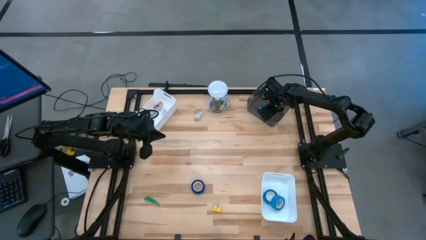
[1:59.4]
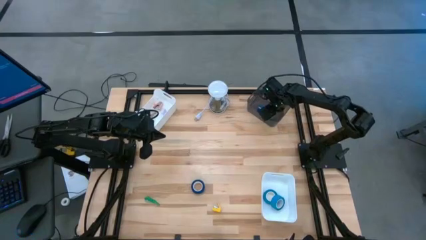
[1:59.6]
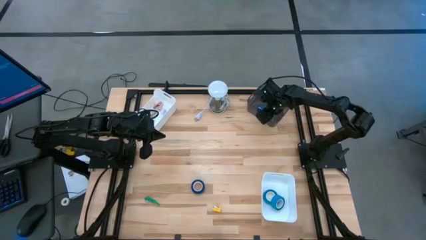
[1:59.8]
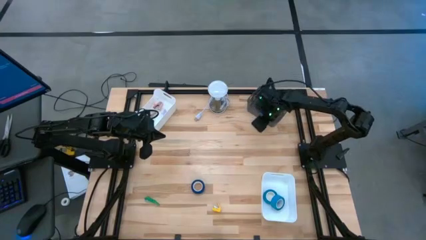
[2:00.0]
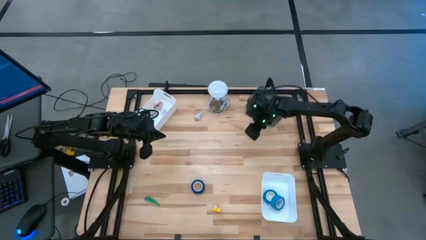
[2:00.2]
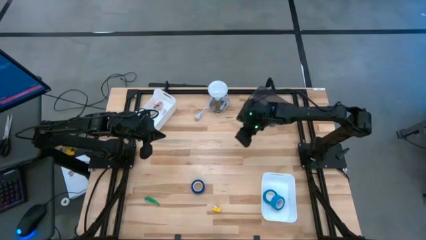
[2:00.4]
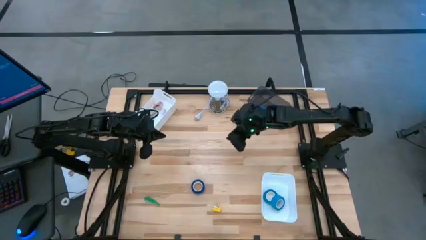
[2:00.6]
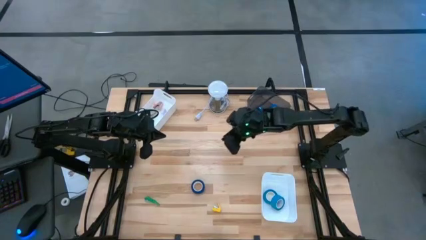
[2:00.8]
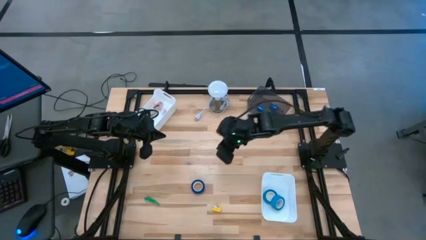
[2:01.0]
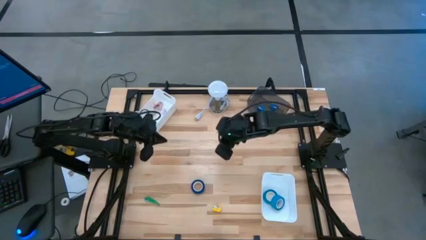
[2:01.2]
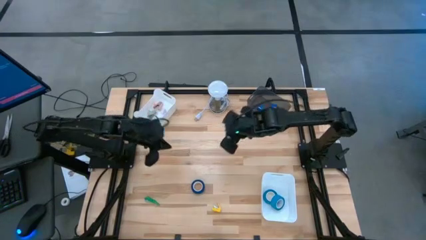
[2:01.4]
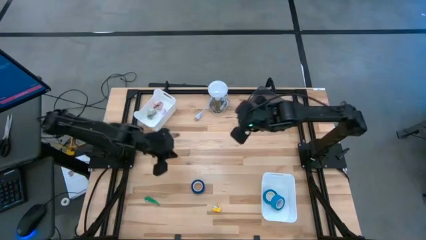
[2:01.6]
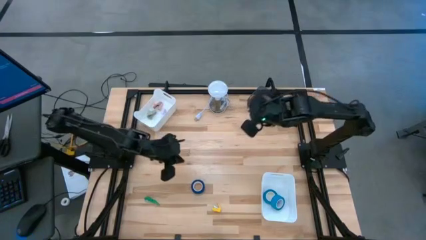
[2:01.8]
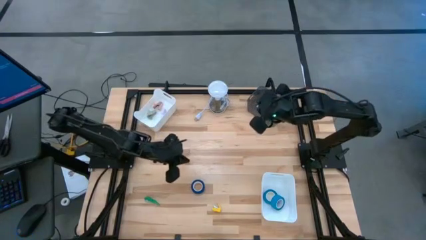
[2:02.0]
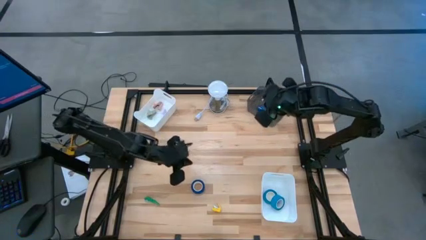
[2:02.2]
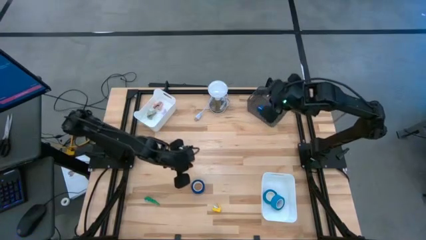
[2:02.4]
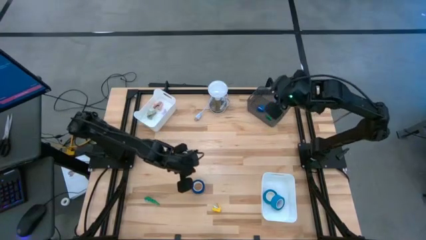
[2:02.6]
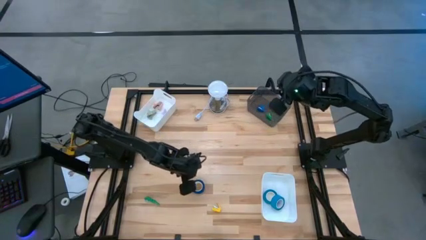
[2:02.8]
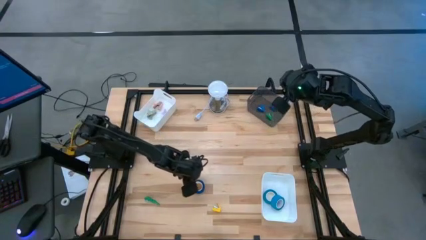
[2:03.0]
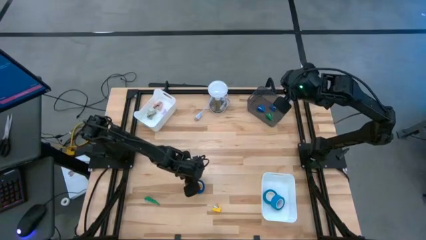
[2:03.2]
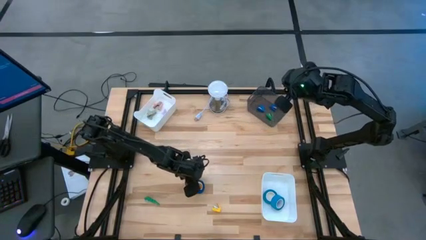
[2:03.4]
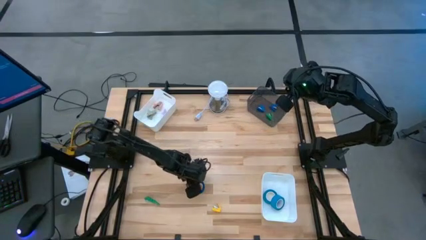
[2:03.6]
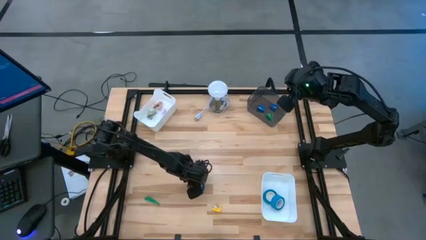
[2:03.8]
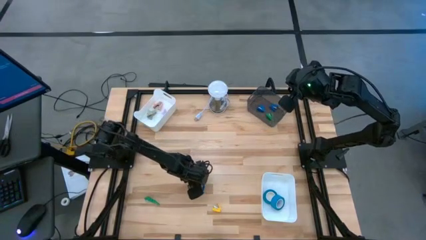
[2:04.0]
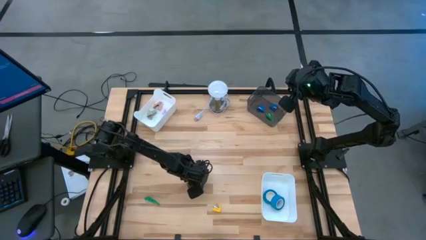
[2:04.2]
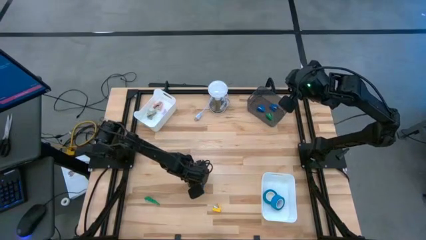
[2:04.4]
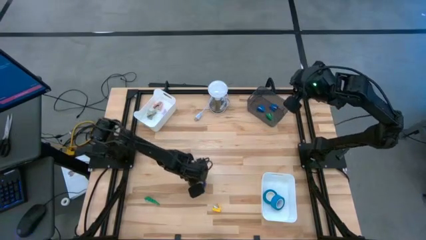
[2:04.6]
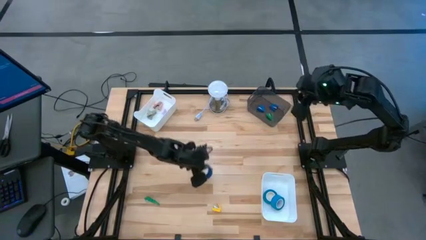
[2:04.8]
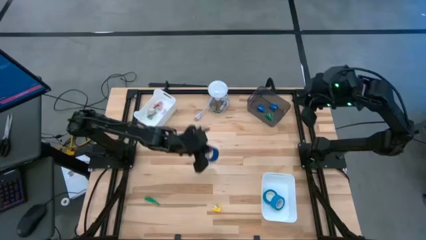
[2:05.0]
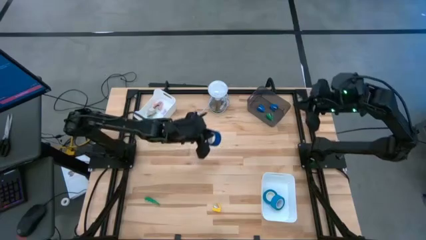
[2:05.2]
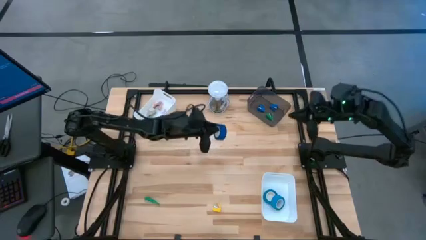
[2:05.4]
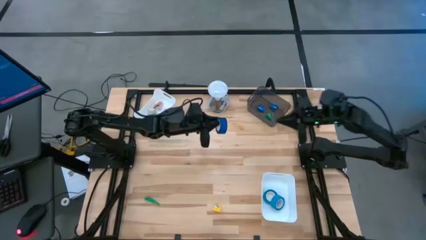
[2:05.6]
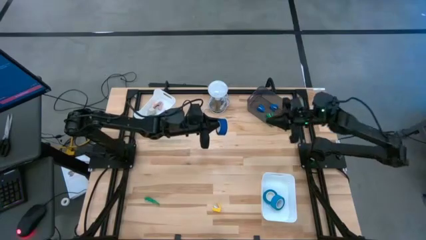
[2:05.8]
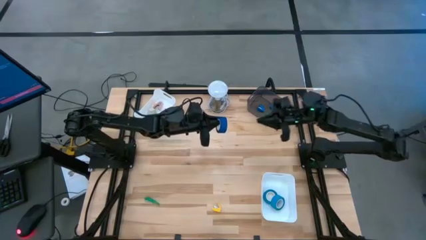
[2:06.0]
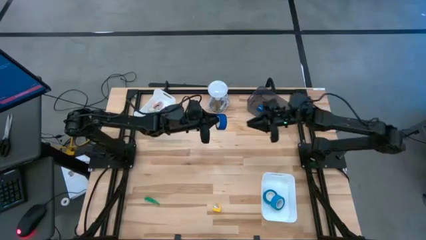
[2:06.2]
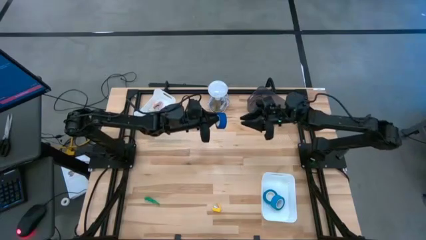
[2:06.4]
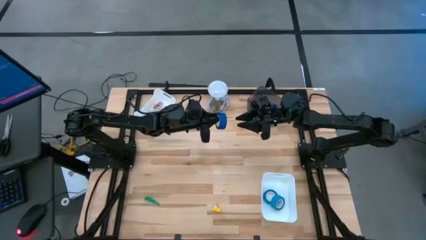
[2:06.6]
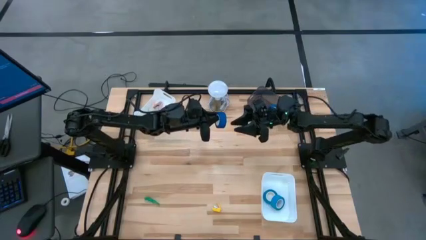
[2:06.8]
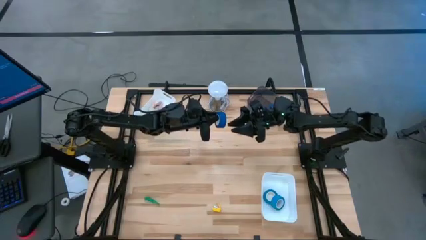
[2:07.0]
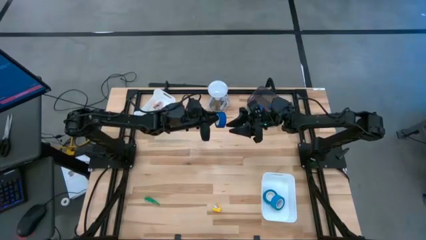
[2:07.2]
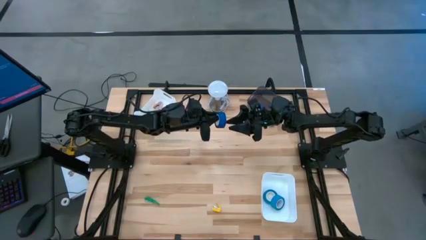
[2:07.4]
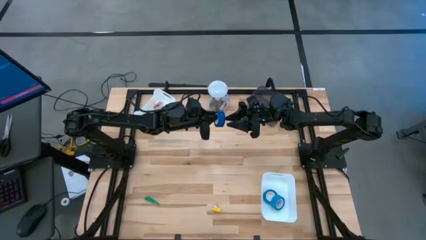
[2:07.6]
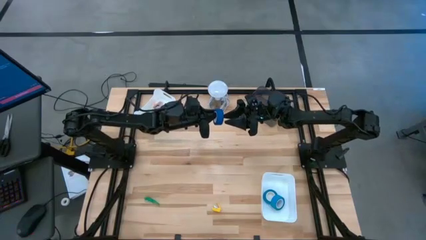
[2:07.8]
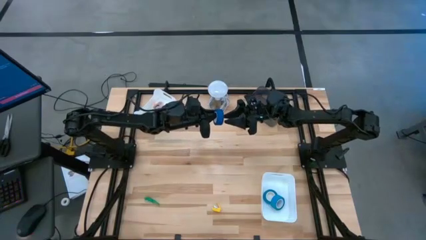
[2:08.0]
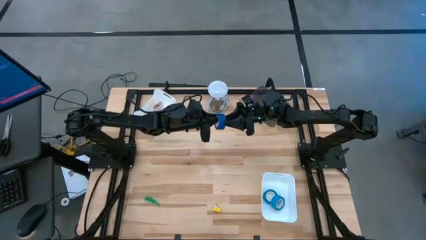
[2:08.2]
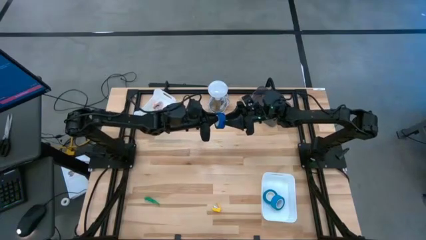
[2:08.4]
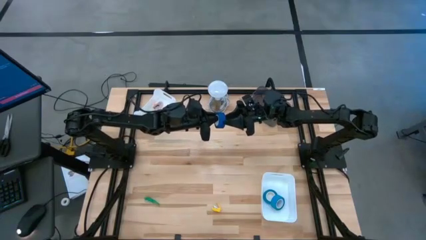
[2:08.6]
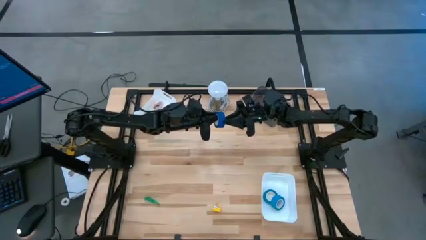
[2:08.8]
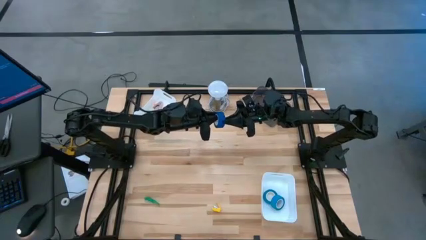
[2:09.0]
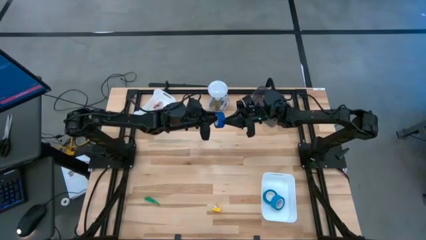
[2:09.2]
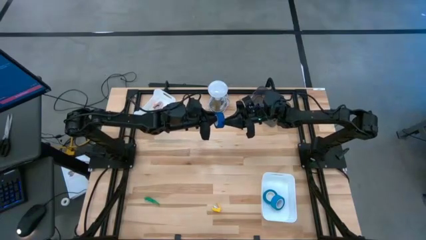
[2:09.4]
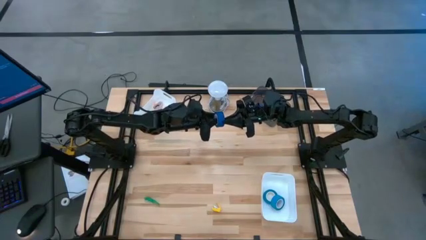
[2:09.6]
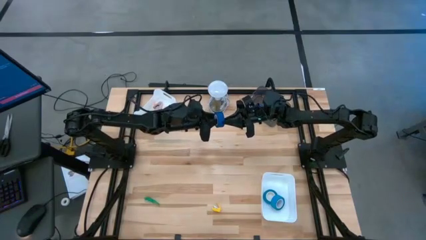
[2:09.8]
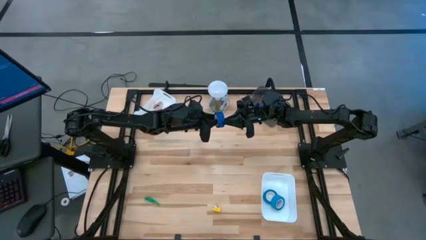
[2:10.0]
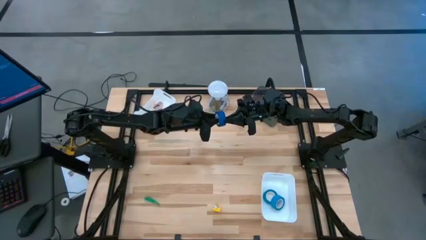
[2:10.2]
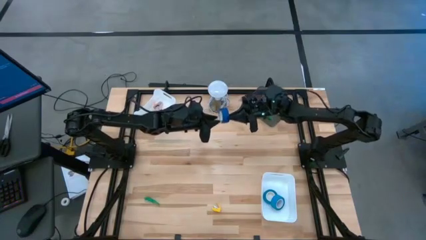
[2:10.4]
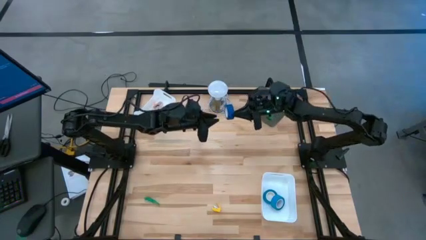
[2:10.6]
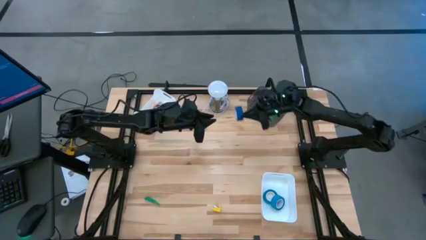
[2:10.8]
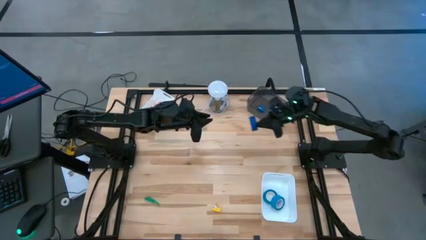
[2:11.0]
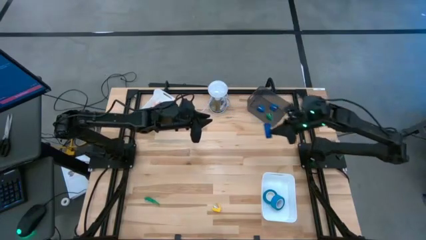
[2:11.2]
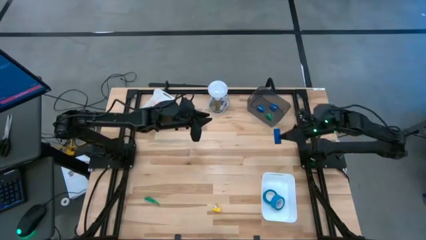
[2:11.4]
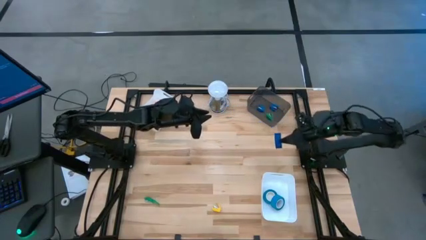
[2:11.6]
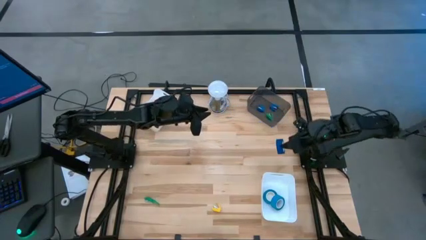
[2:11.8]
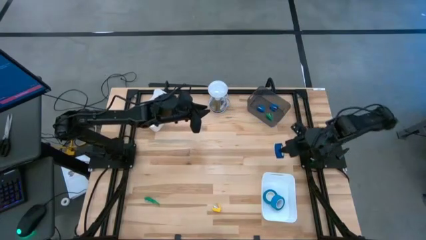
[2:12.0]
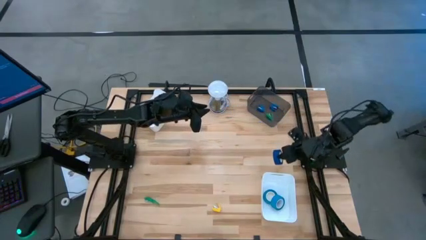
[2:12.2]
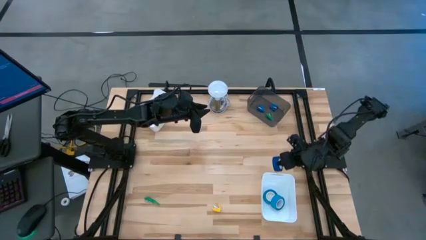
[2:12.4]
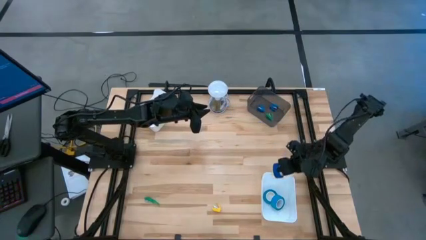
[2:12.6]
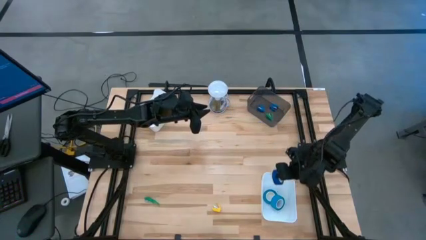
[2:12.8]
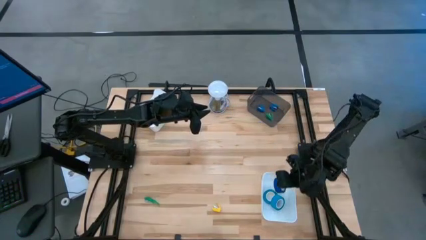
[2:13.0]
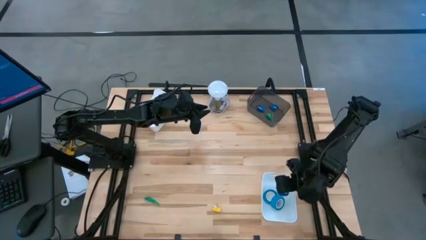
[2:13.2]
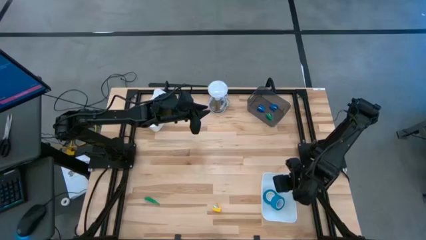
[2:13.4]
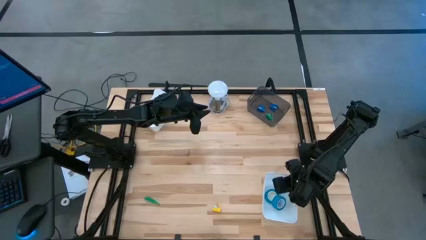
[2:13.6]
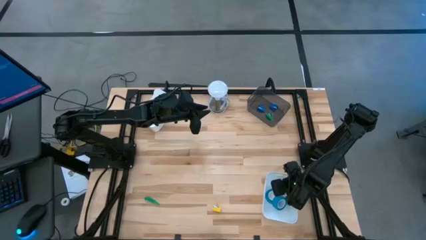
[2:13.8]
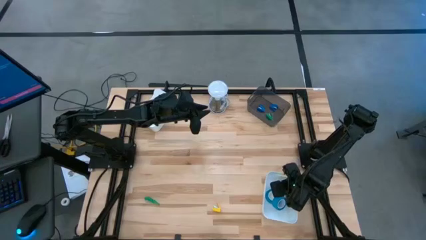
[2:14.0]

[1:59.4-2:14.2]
Task: Pick and place Stapler, Stapler remover, tape
Put the blue tape into the bottom white bin
